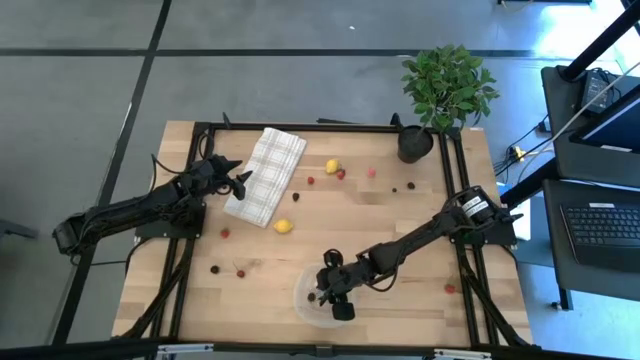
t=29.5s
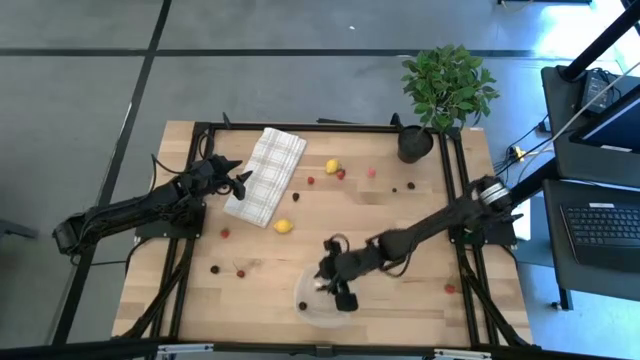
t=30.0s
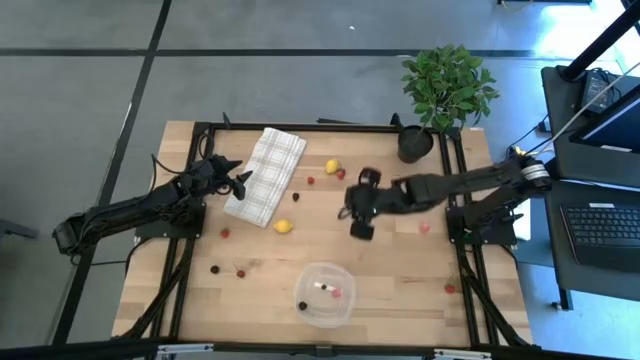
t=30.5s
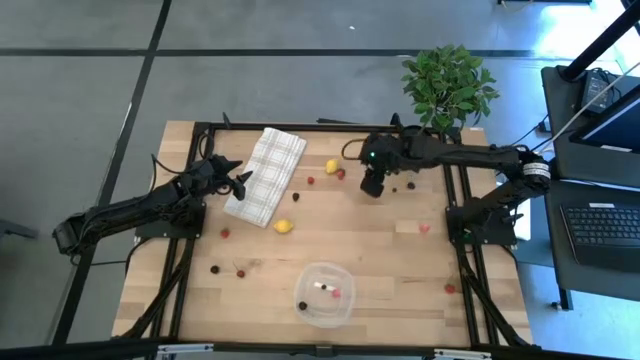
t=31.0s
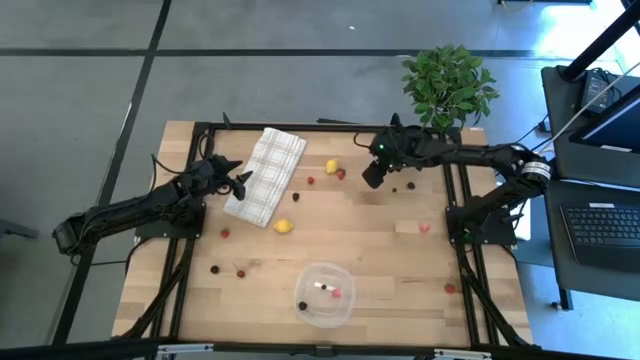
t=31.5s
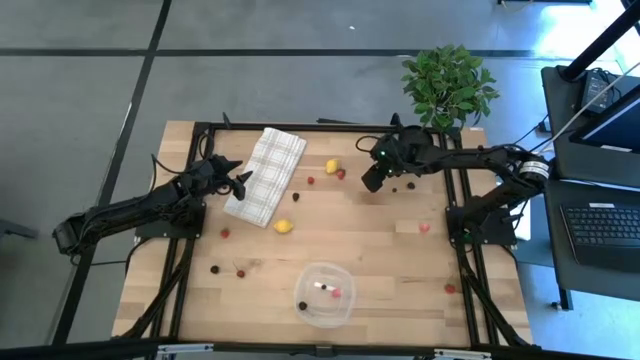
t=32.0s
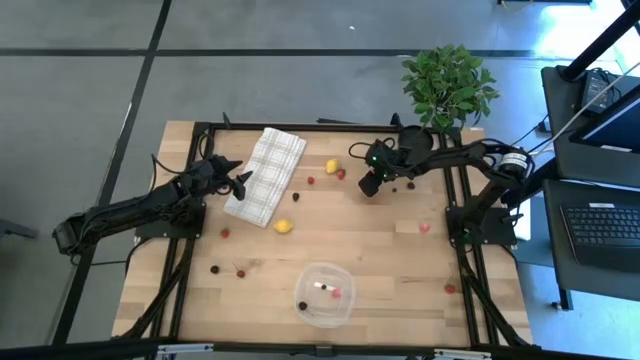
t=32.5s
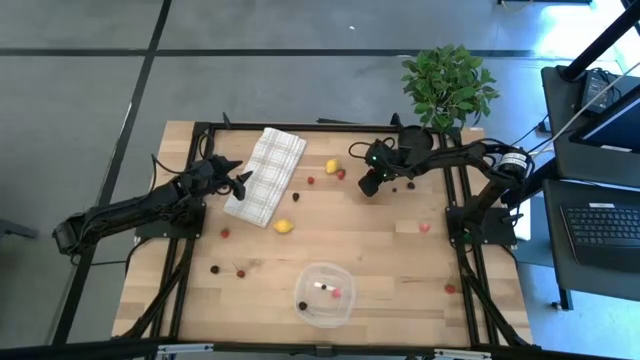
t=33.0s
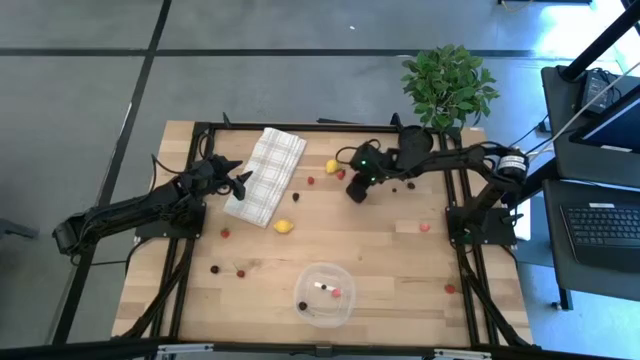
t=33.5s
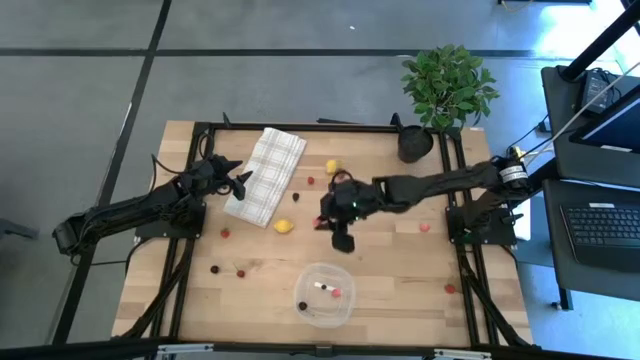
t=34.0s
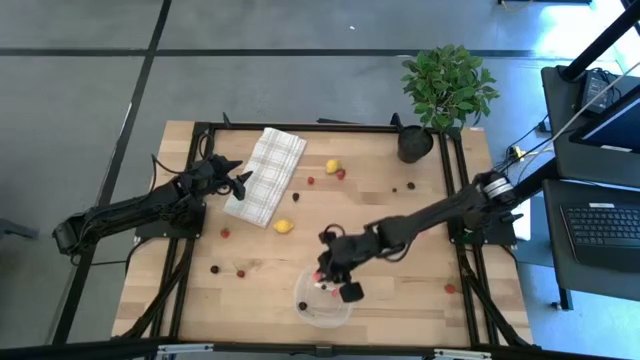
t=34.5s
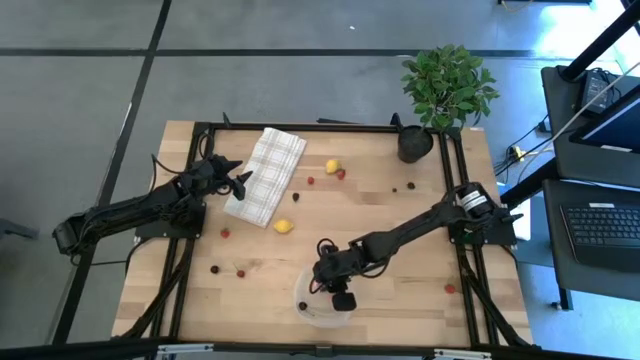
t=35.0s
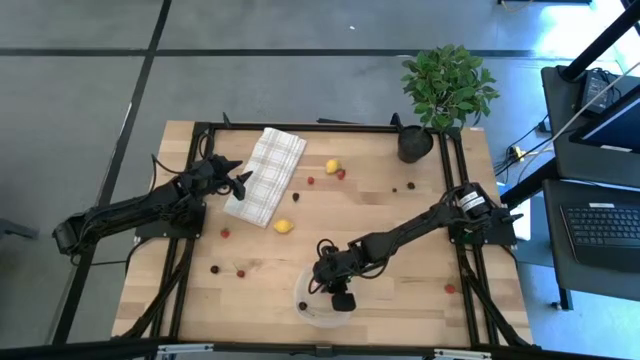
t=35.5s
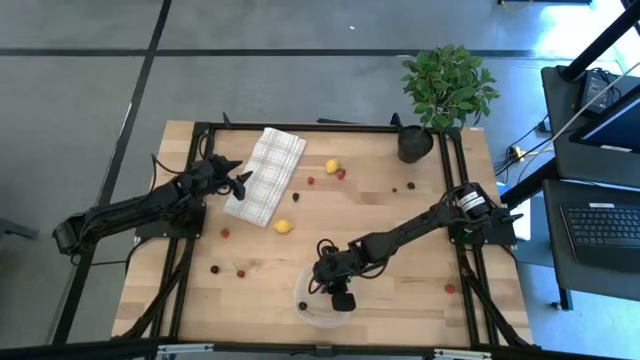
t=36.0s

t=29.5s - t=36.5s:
Task: Pick and placing Produce into tupperware
Put the top peach into the transparent bin

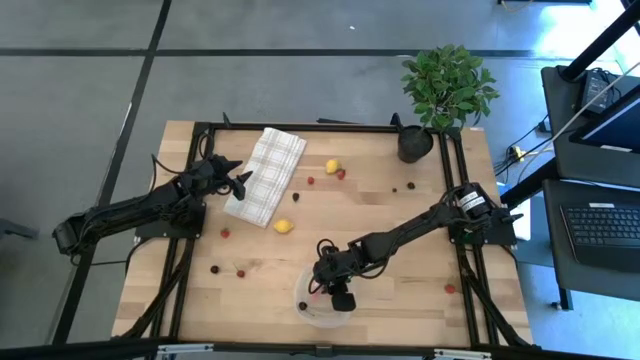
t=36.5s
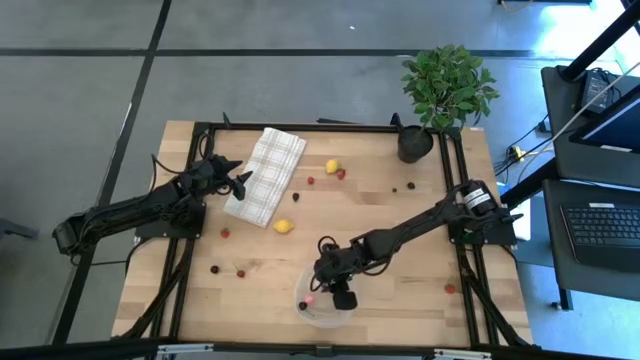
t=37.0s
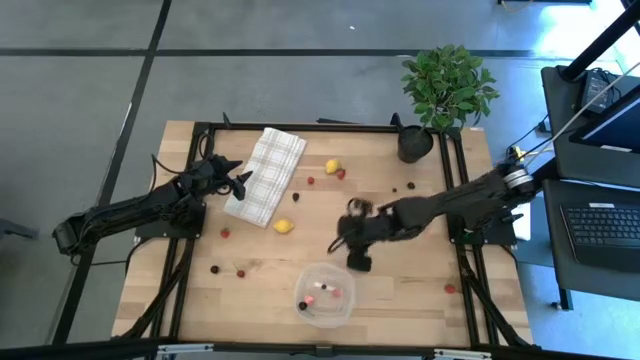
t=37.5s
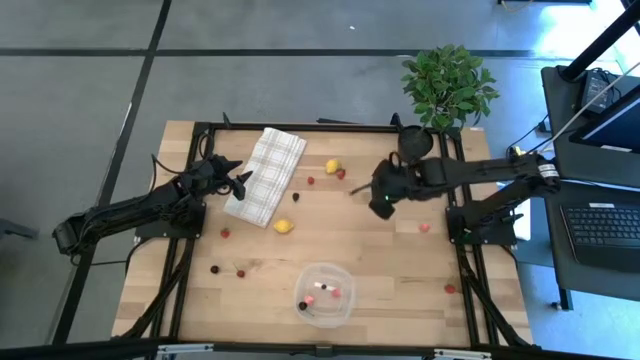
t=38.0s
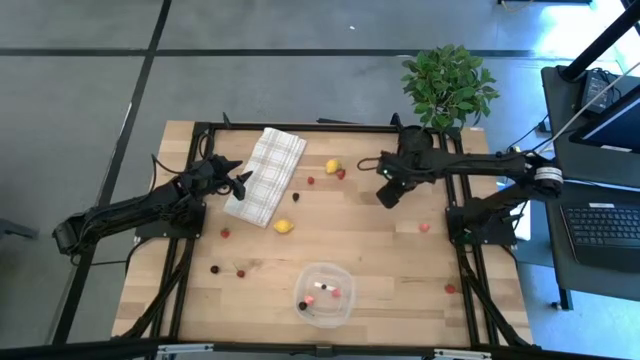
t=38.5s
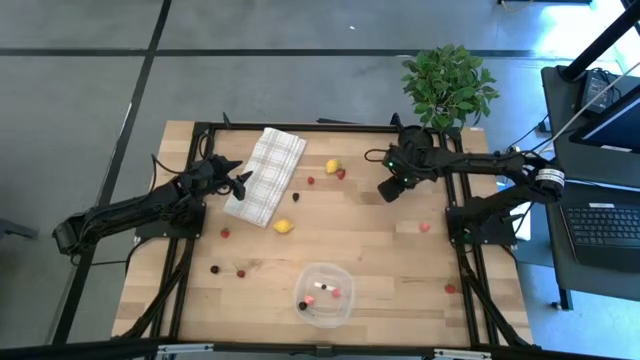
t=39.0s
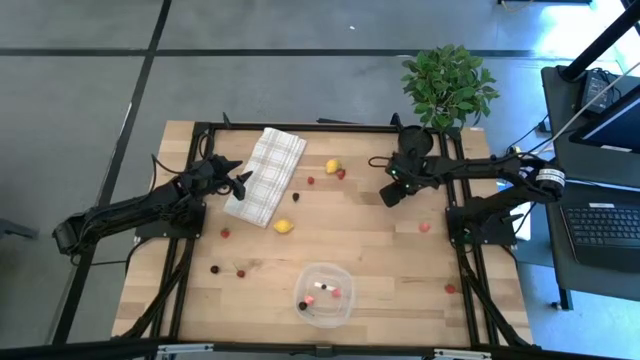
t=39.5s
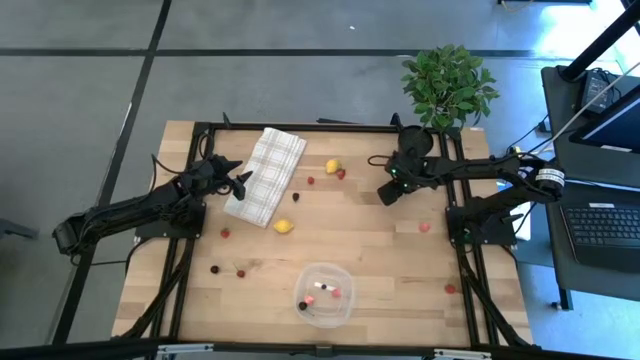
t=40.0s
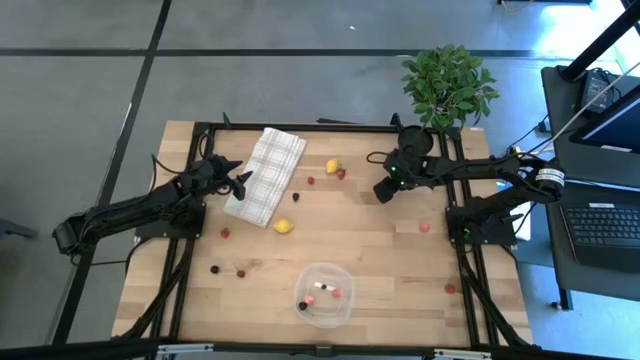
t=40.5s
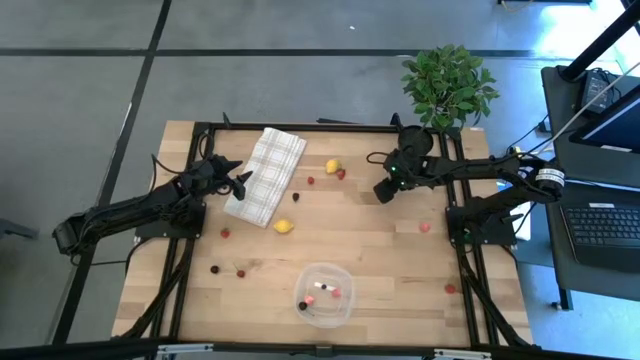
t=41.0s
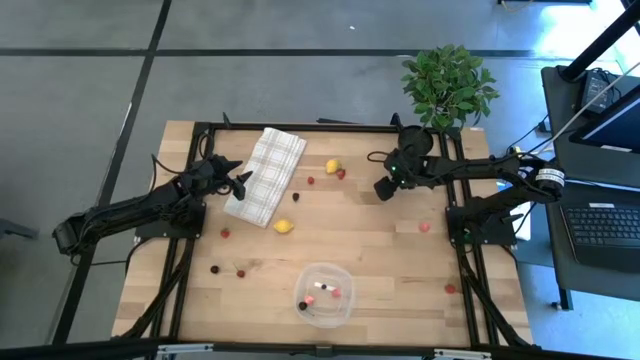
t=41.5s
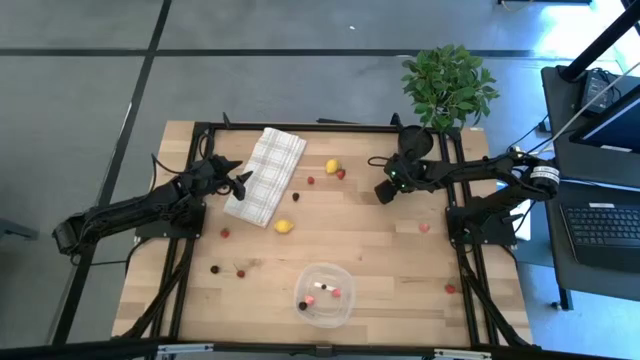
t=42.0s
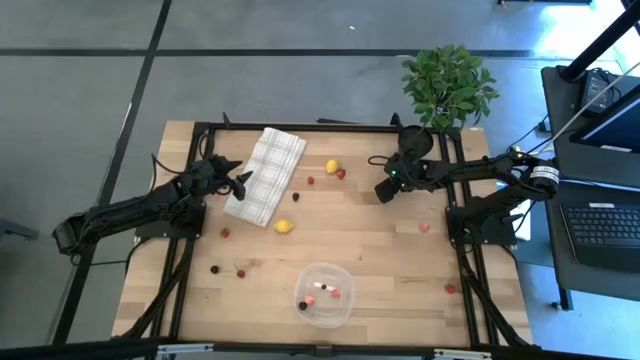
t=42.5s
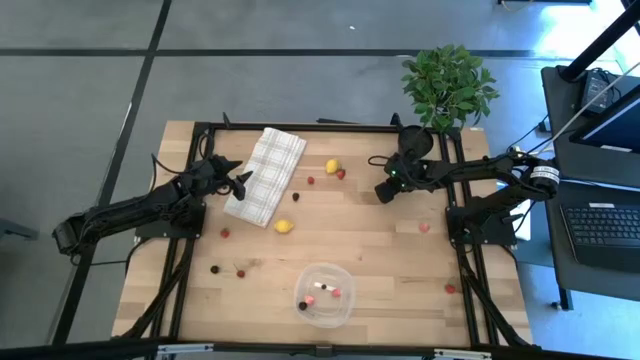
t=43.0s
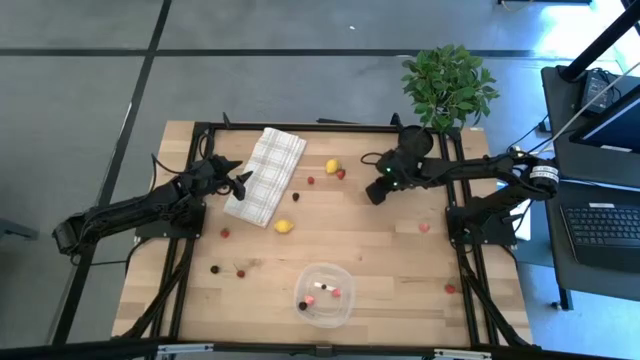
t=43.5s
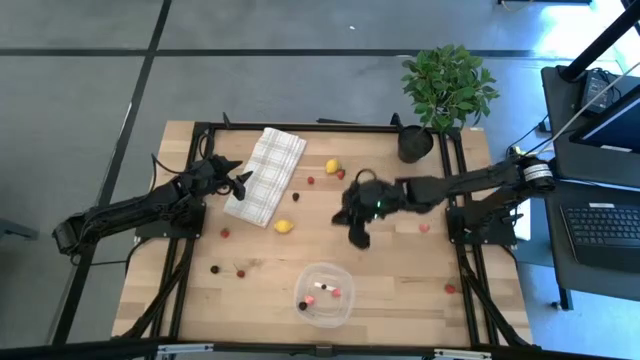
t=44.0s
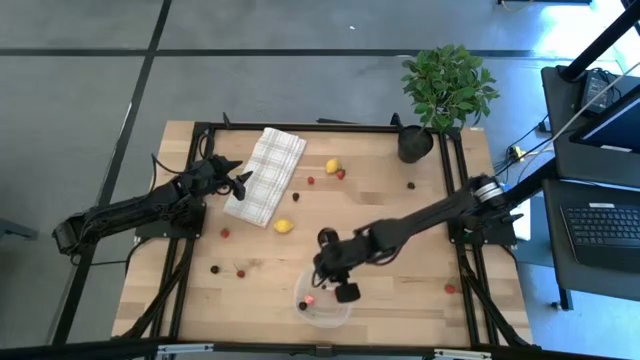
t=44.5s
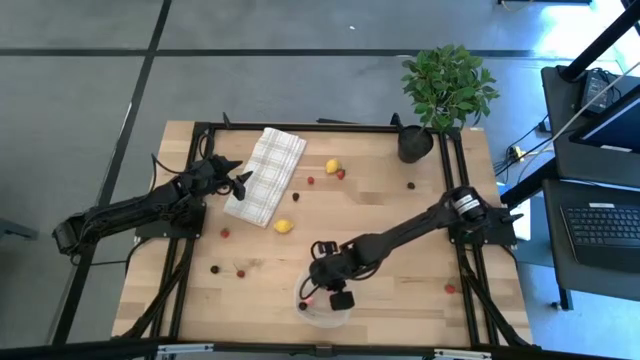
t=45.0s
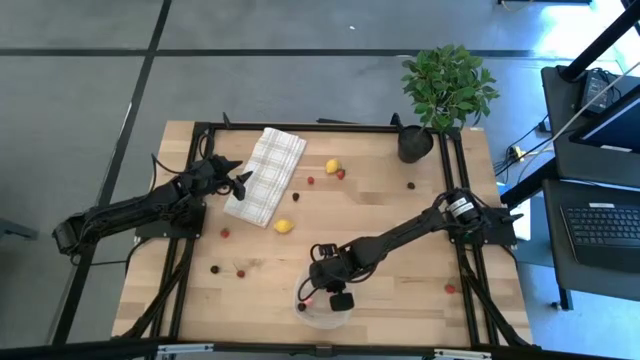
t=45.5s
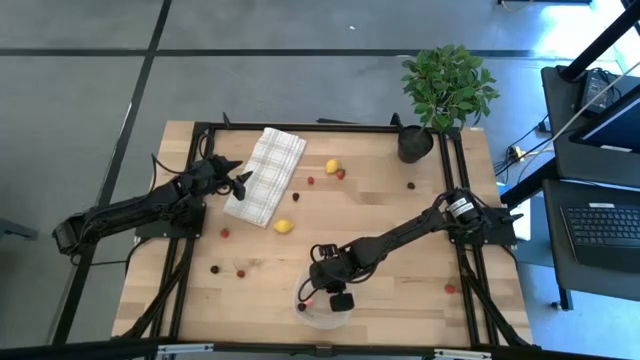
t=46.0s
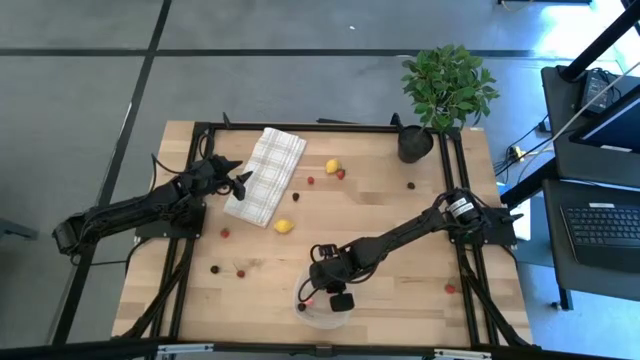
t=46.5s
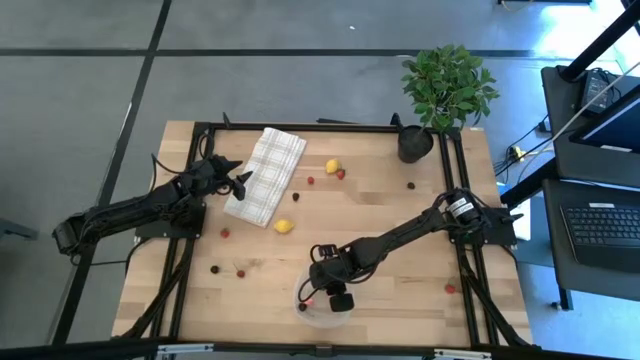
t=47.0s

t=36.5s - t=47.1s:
Put the blueberry into the transparent bin
